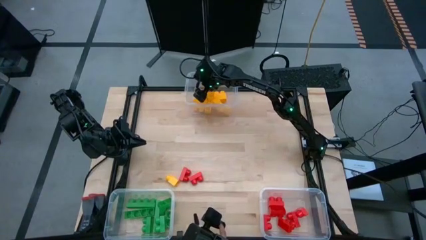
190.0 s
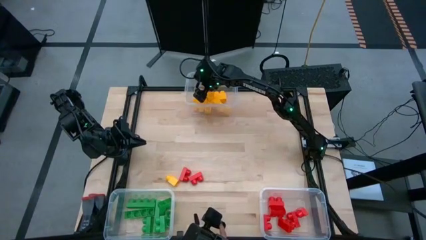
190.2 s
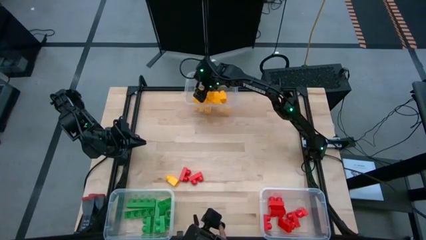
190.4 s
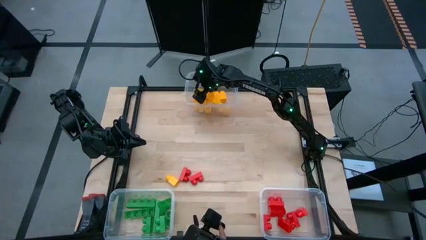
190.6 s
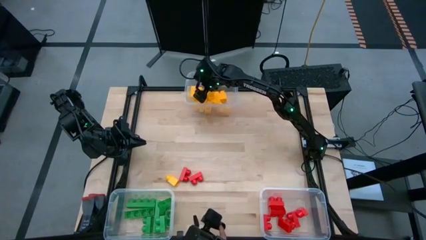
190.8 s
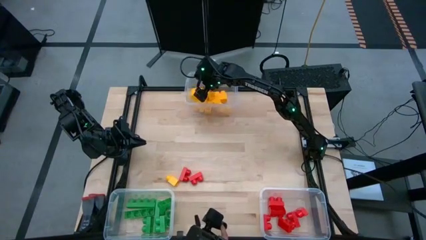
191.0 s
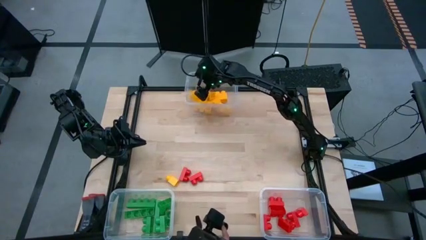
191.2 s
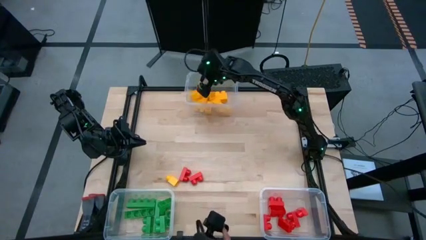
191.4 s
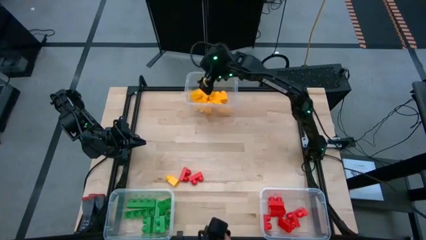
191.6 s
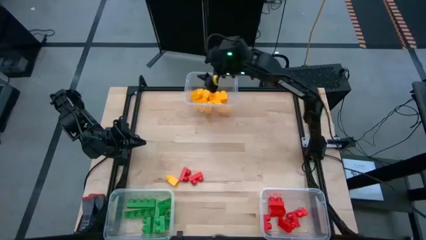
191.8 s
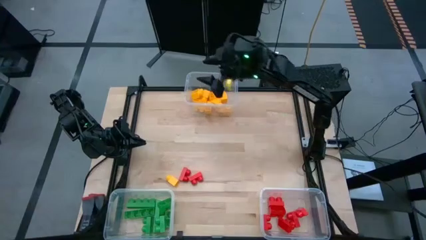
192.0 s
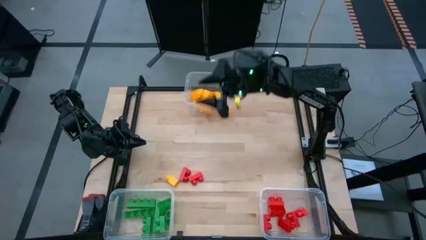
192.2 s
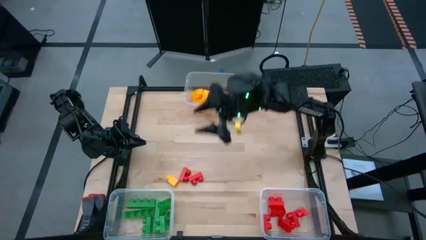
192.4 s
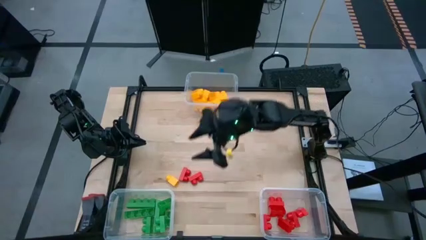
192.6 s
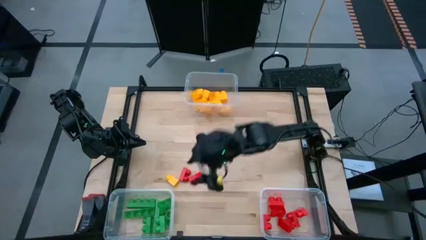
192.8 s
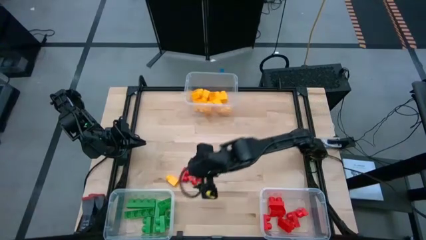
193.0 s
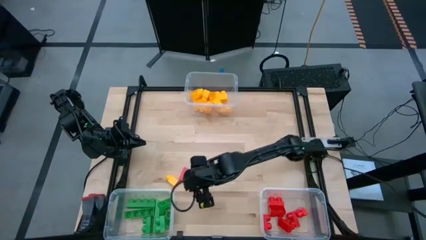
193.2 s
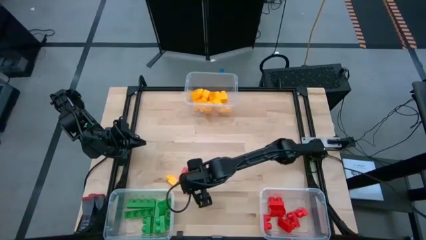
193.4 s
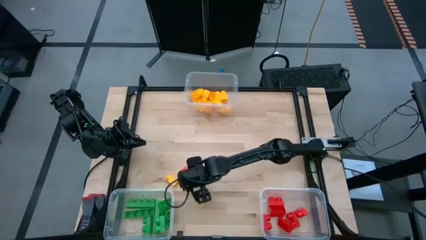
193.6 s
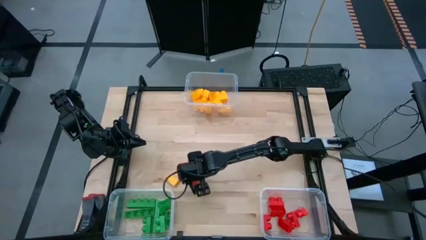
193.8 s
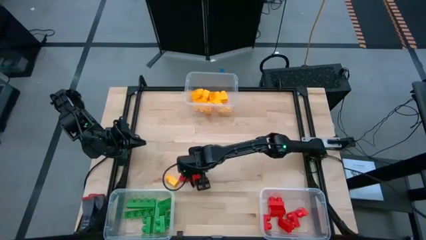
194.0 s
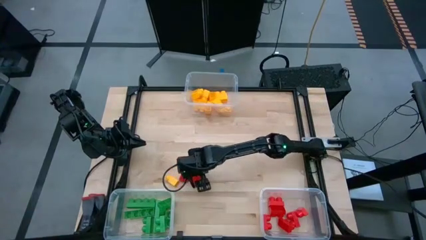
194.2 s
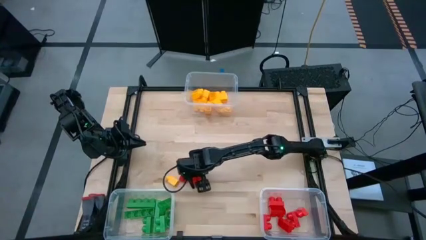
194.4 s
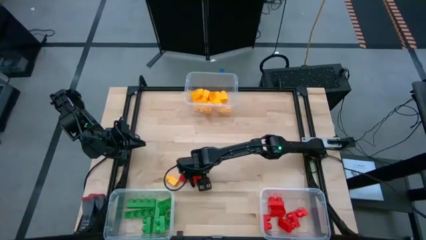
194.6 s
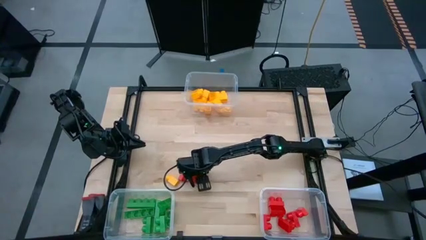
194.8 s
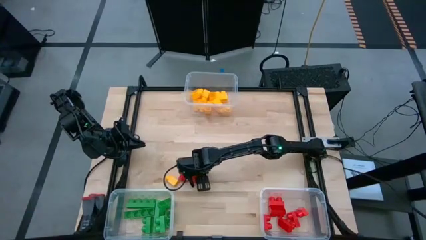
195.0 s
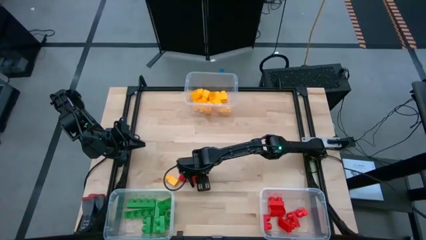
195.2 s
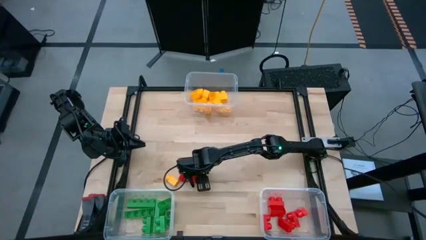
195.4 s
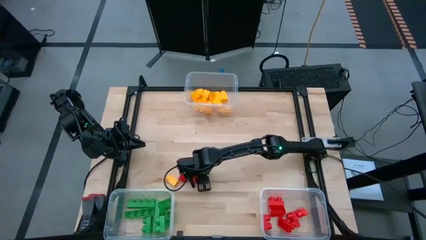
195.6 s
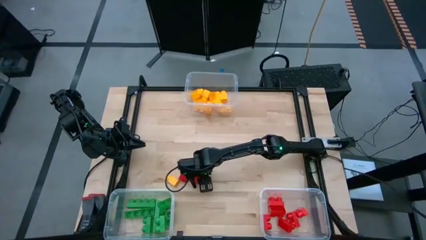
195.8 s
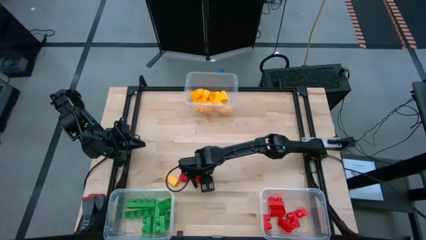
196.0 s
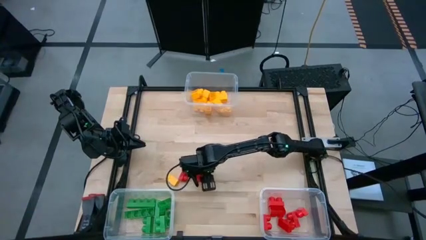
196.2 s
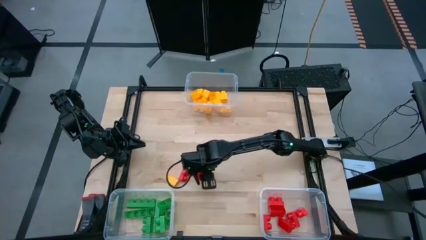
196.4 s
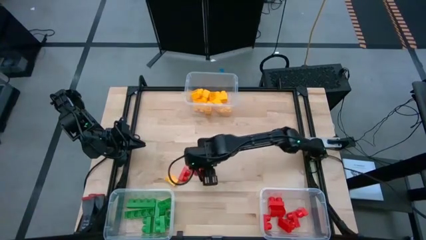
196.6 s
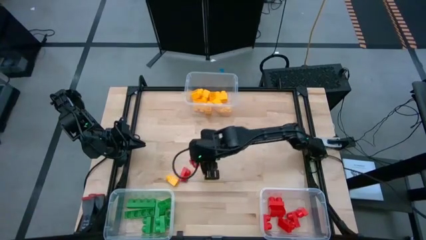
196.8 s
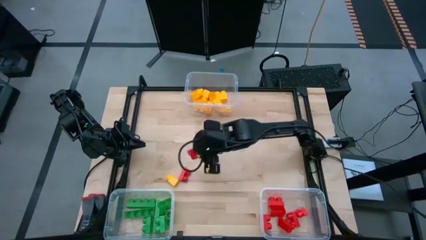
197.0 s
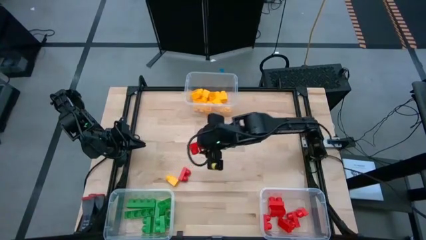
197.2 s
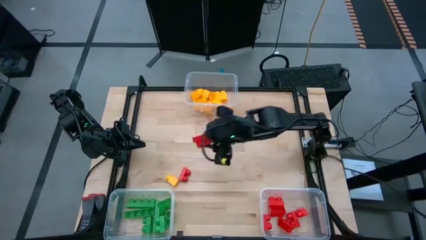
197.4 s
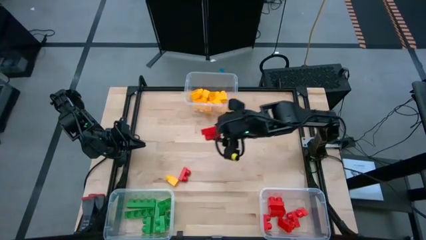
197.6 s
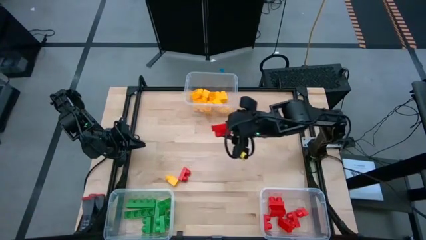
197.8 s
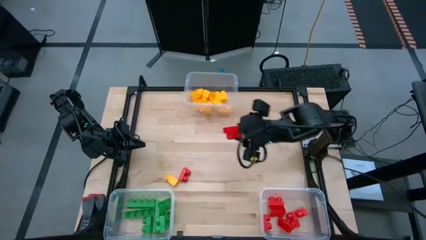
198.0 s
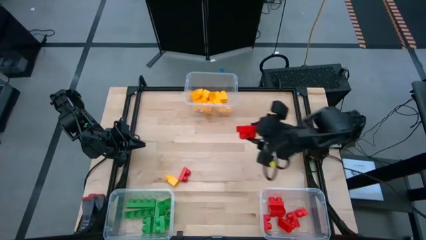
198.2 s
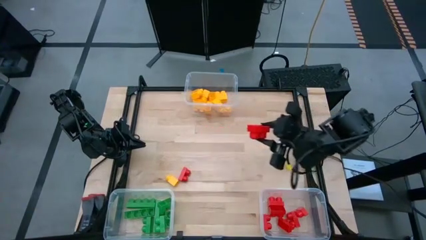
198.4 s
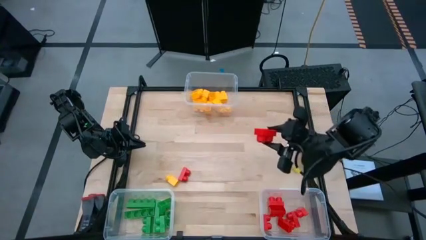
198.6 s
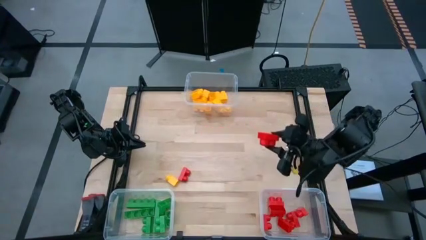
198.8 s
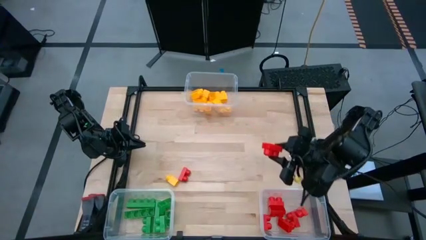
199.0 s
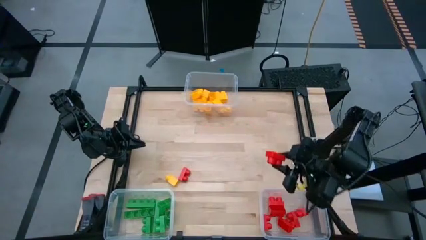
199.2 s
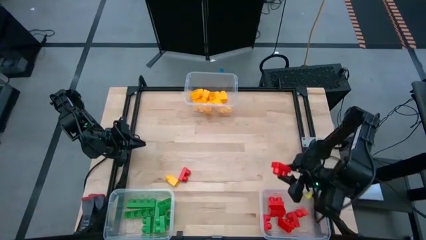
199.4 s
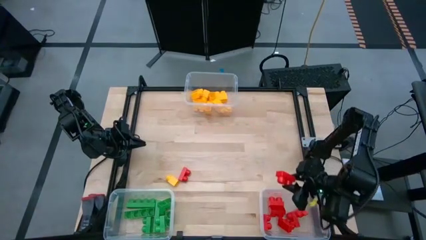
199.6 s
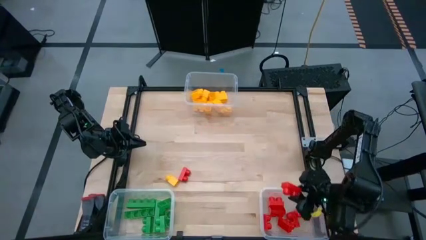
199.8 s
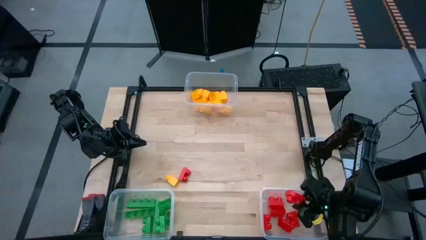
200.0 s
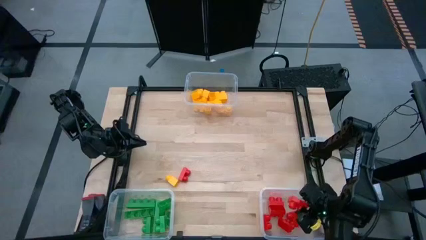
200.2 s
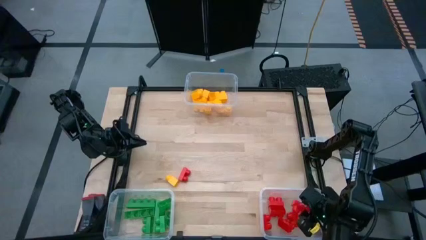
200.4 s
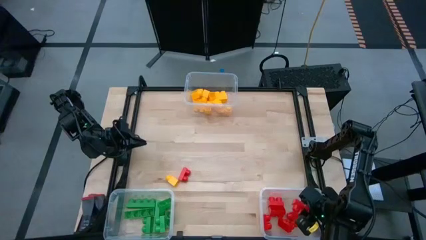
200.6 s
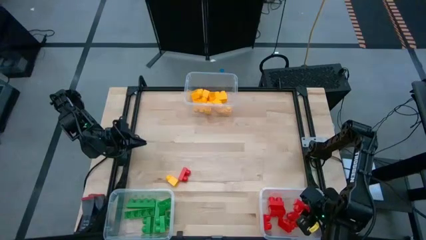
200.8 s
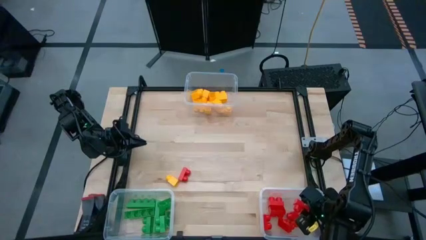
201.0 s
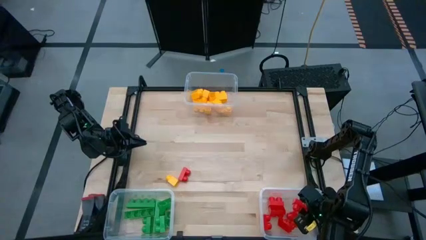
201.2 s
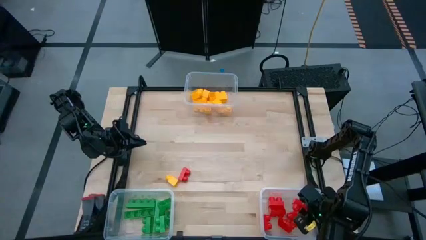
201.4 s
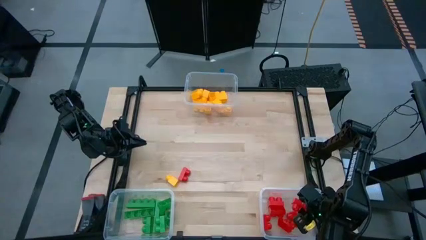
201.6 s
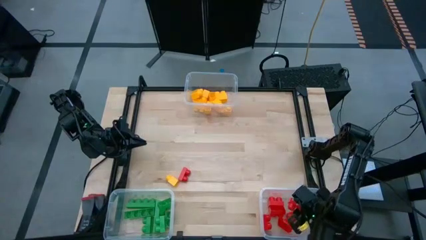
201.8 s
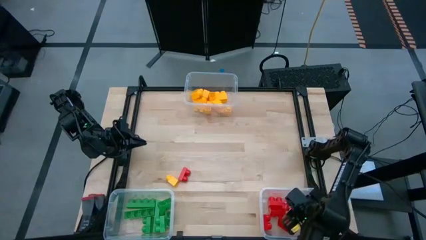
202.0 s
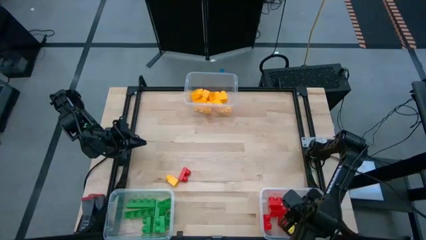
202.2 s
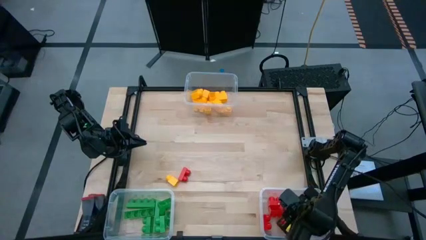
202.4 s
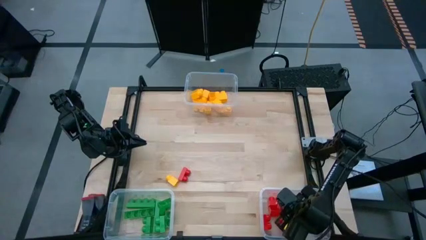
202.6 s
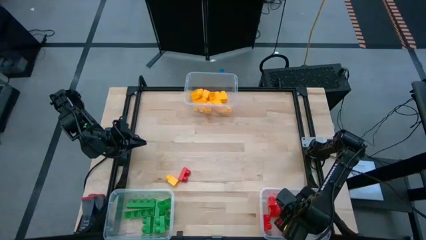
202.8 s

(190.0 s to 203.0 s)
Task: Sort blocks
Put the red game piece into the bottom right transparent bin

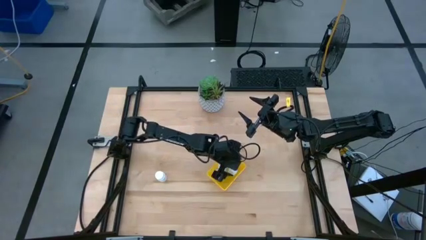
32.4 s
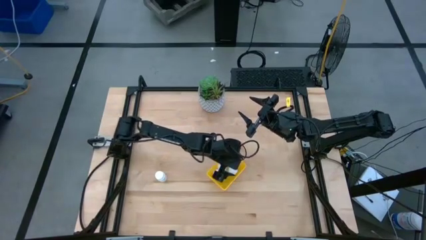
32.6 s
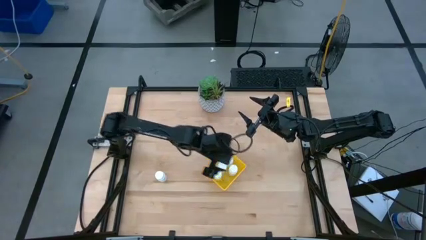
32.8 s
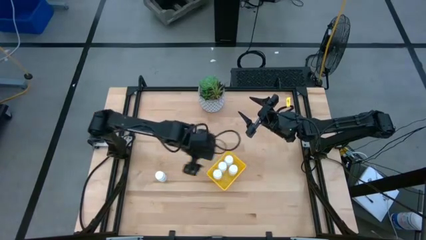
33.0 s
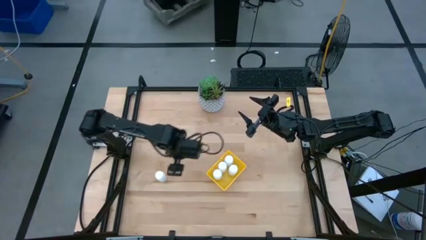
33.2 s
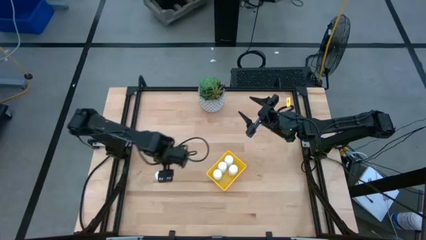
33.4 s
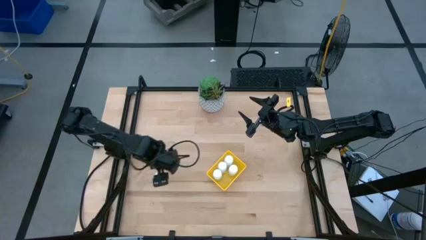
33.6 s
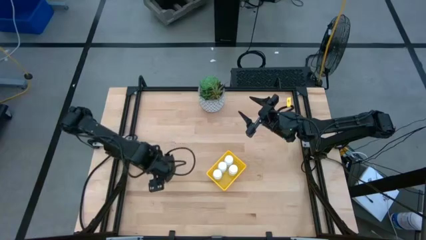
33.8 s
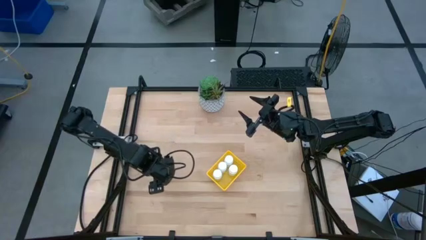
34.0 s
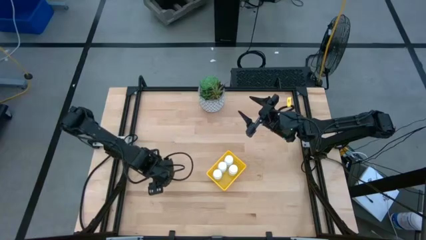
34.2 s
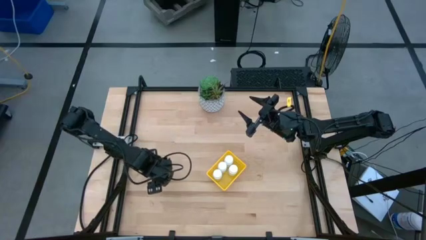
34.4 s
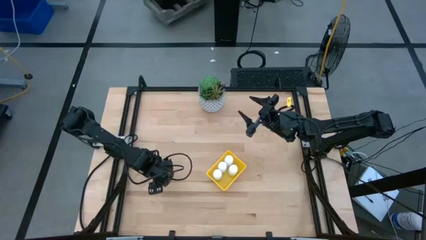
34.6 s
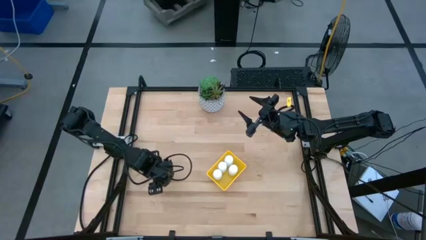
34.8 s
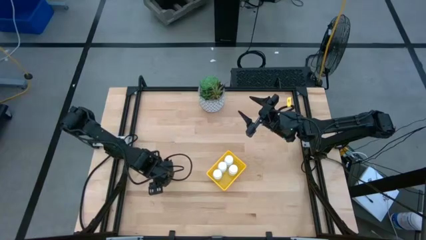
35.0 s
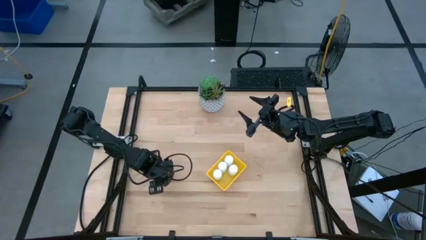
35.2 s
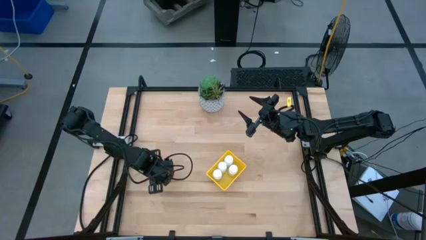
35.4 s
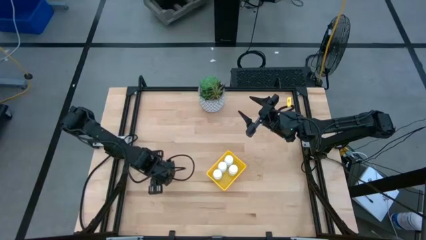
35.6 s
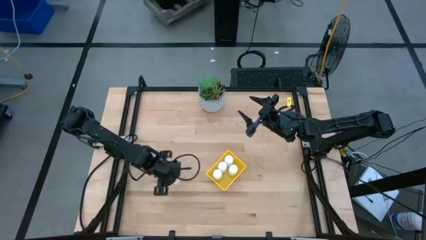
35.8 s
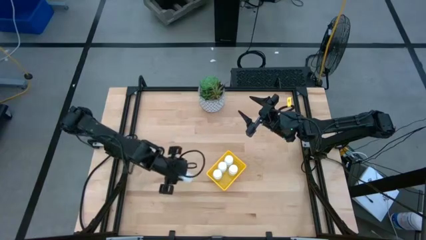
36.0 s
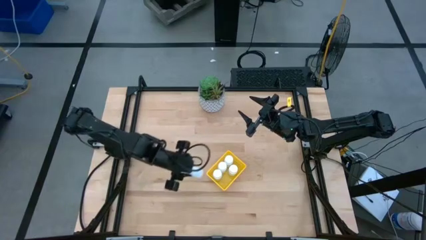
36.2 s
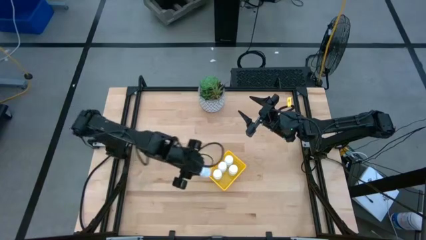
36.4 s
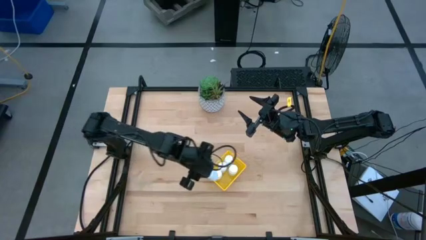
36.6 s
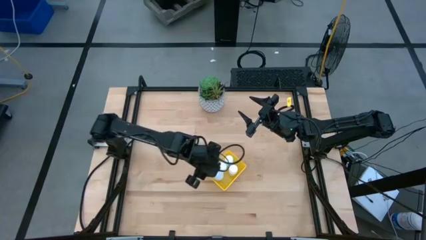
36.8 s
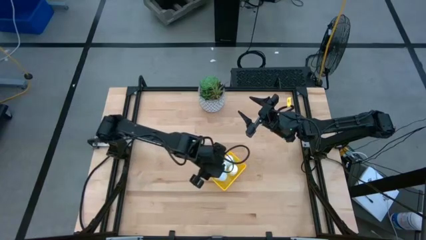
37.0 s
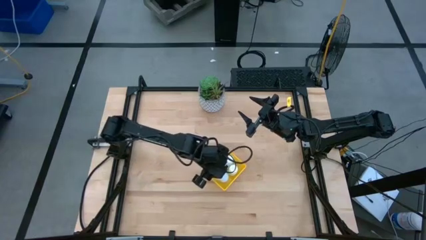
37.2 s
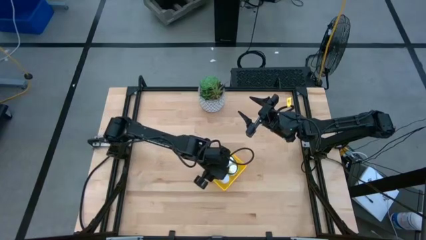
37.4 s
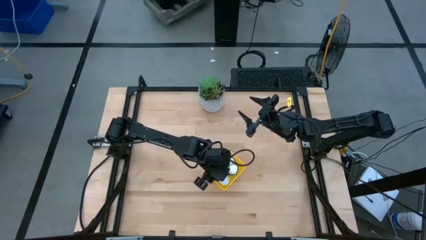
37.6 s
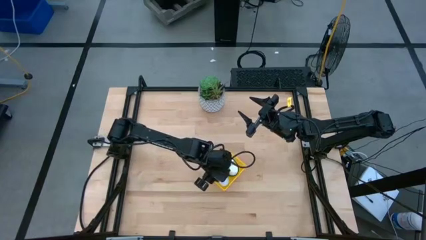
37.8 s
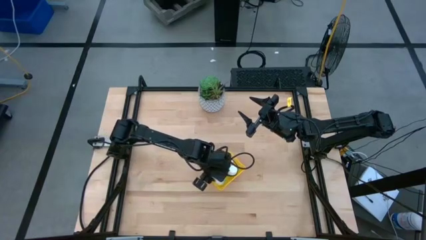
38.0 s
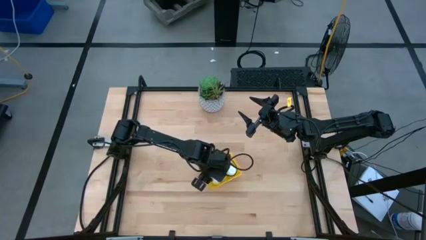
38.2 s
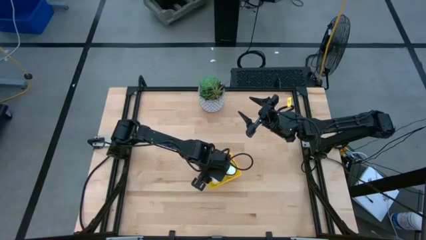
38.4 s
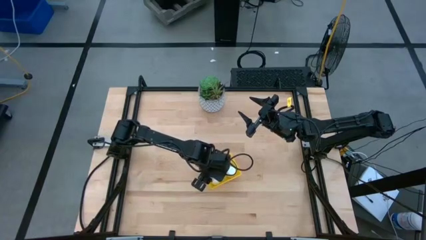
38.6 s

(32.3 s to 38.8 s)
Task: Pick and place pill bottles into a basket
Put the white pill bottle into the yellow basket
